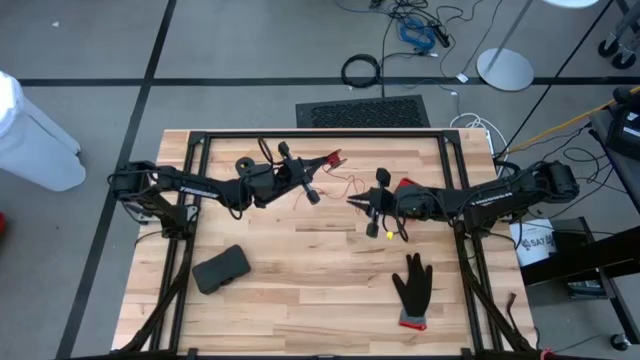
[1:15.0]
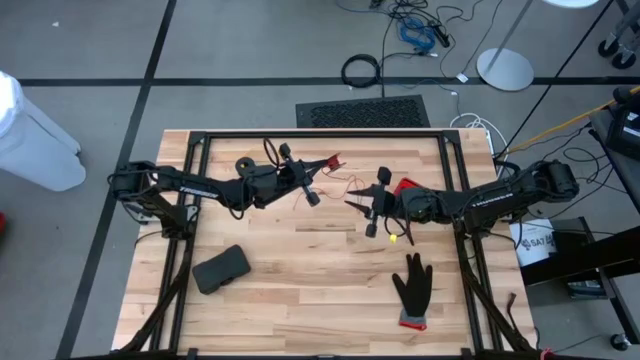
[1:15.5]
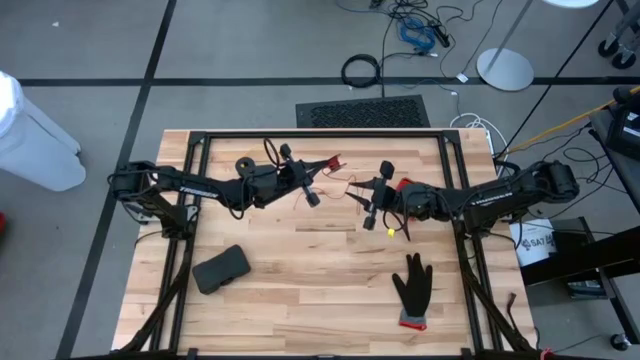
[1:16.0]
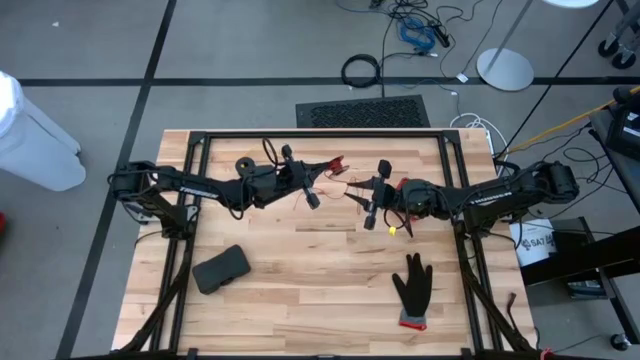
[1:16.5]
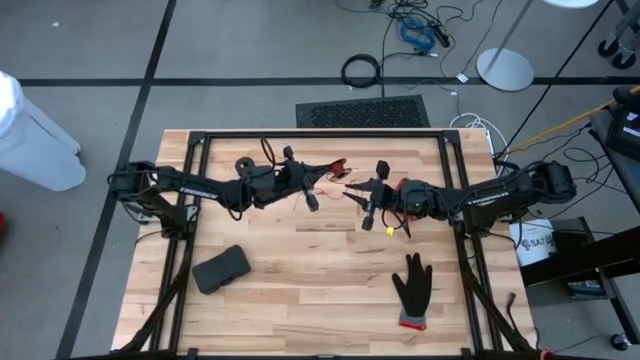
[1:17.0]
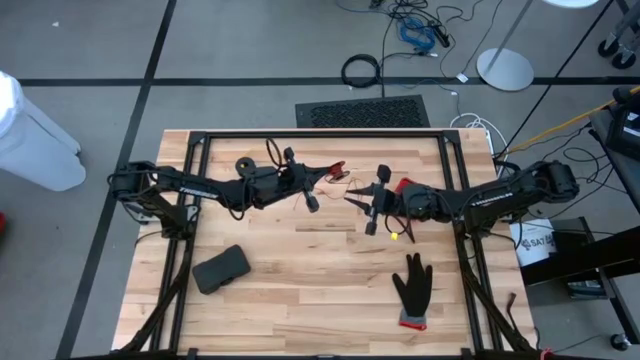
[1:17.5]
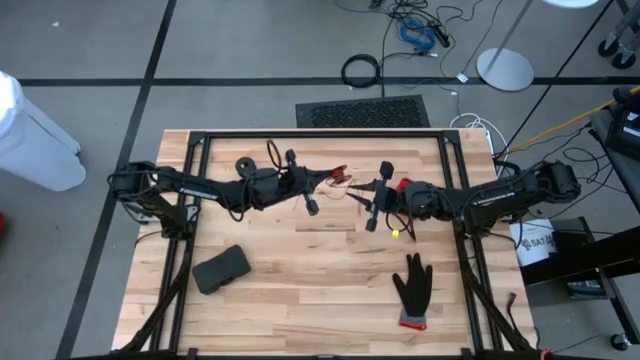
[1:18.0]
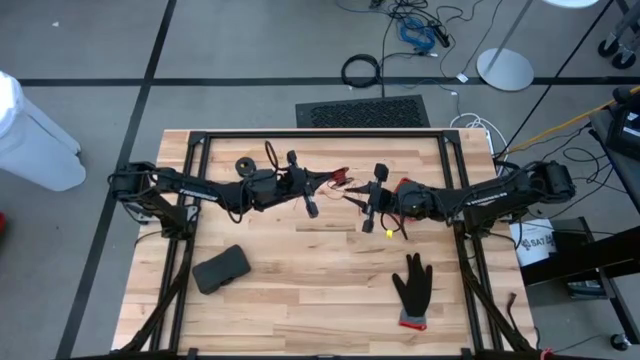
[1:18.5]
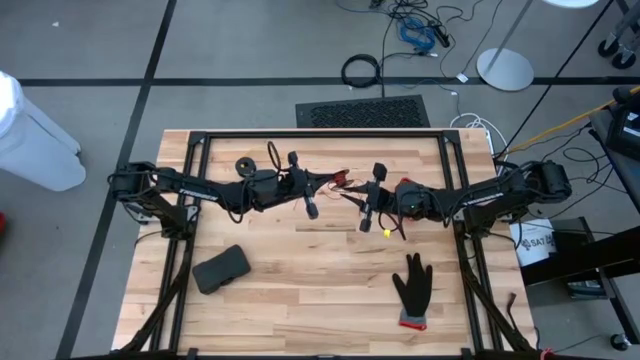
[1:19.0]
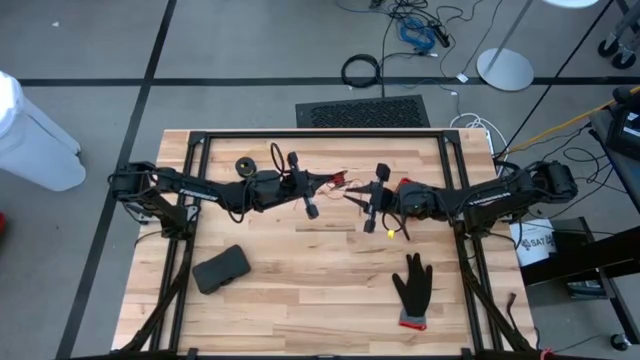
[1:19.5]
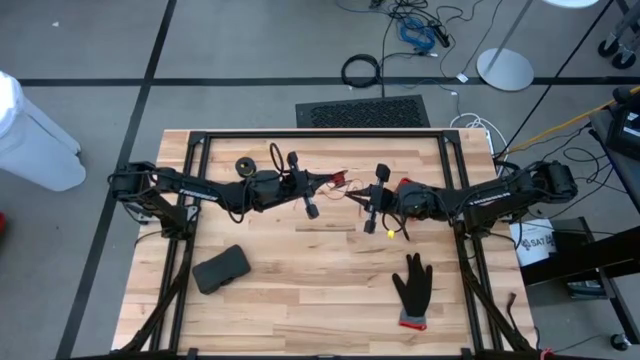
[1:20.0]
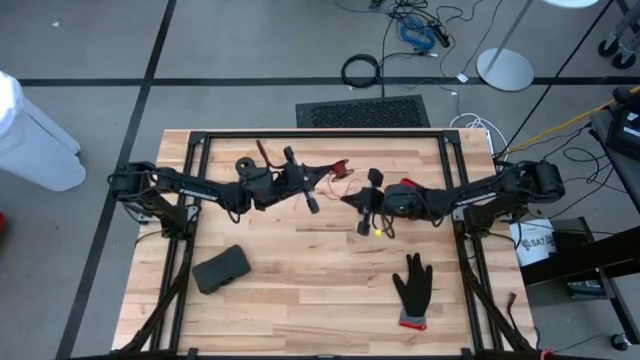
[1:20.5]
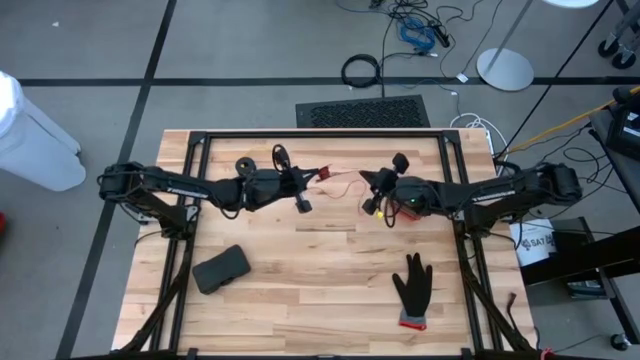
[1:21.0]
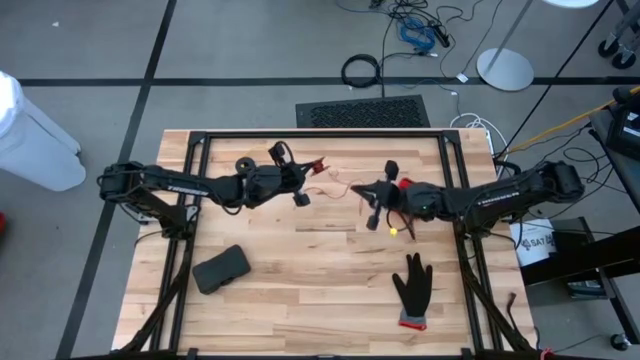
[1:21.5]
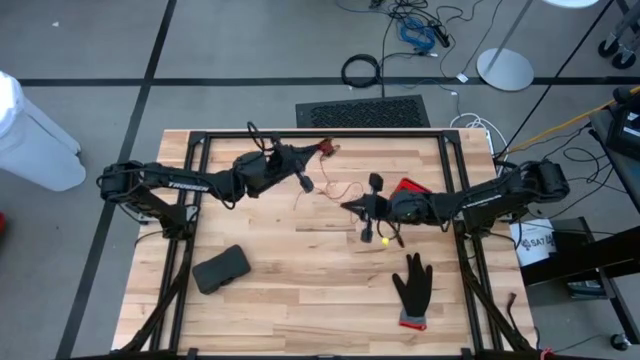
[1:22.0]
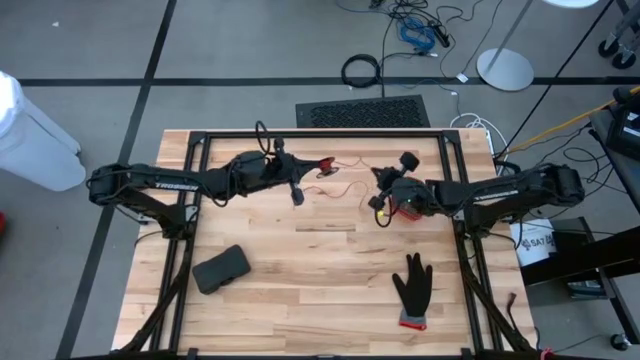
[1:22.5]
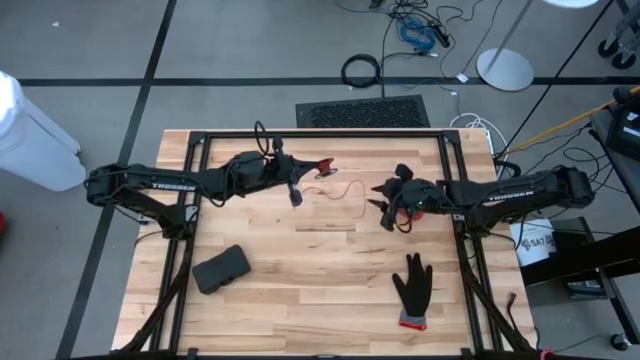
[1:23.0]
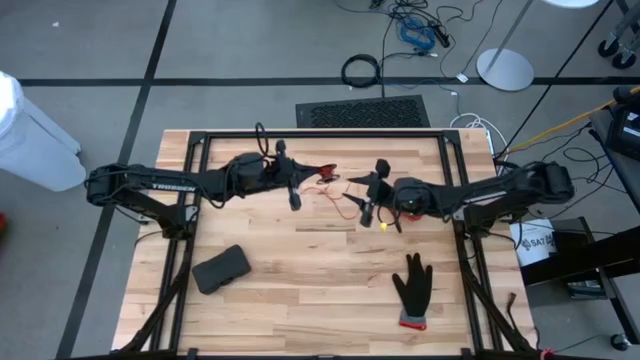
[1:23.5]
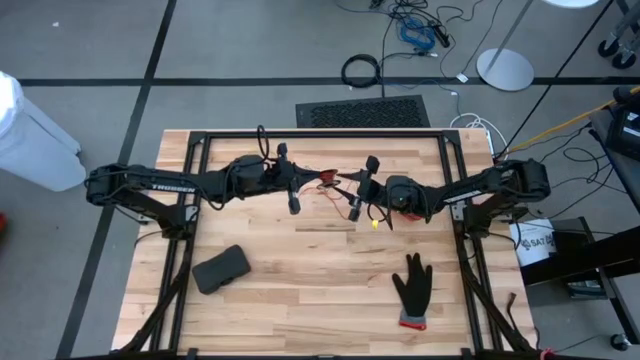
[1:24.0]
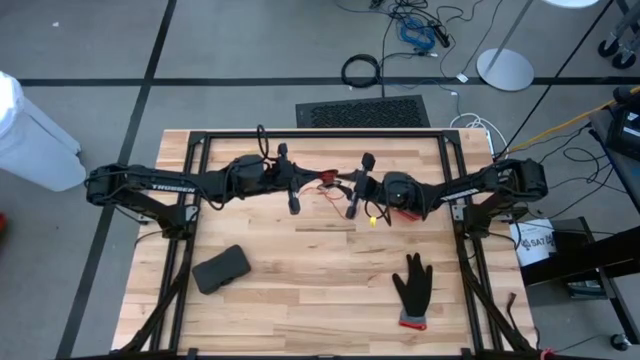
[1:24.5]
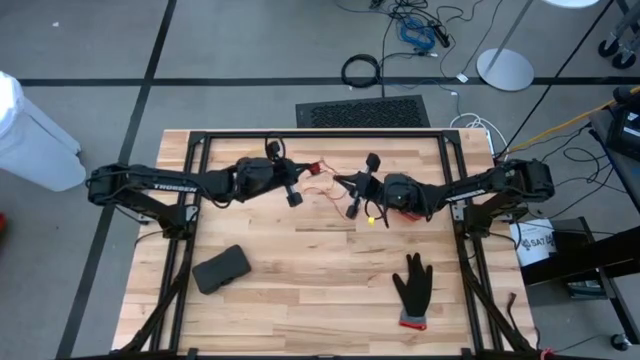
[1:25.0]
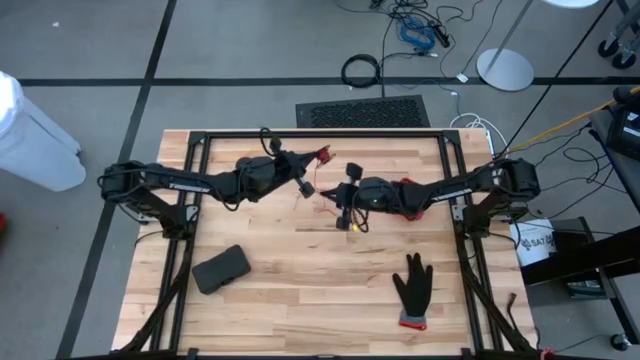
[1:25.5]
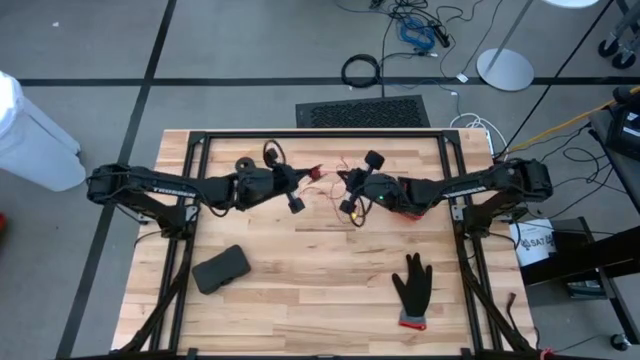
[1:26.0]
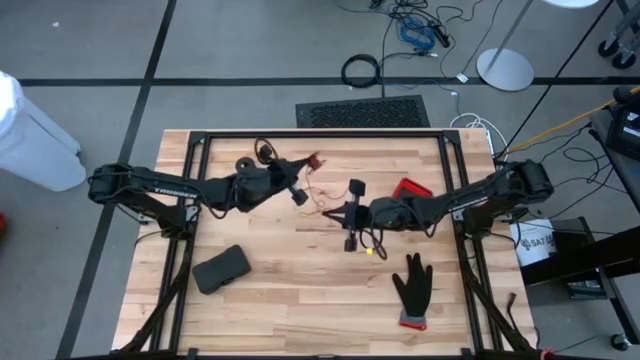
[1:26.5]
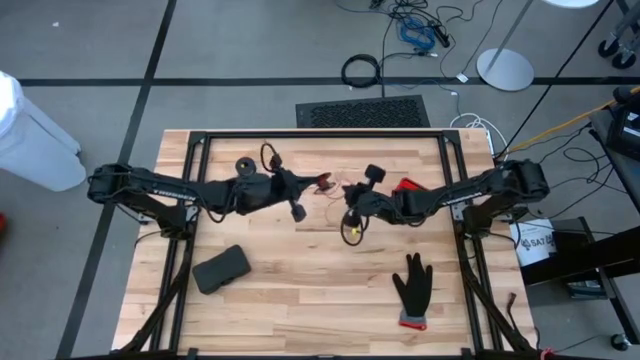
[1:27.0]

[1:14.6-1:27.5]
Task: Coil cords
Uncoil the red wire from the black spool

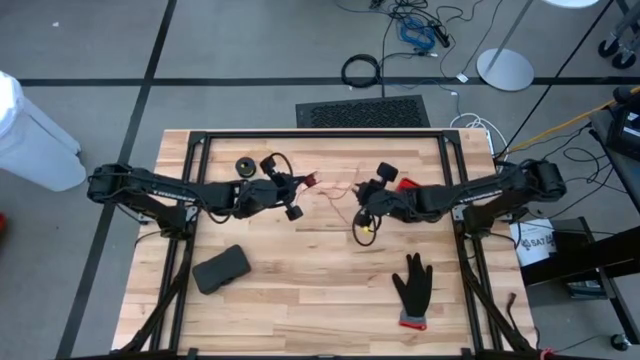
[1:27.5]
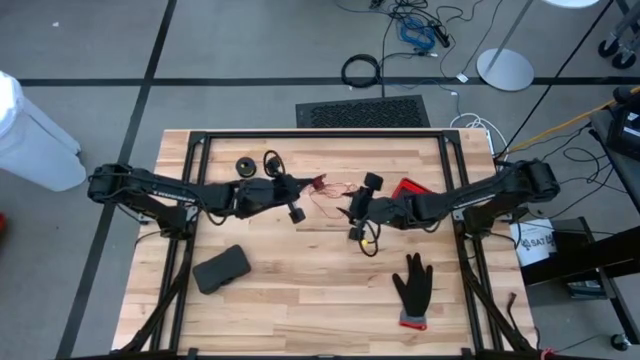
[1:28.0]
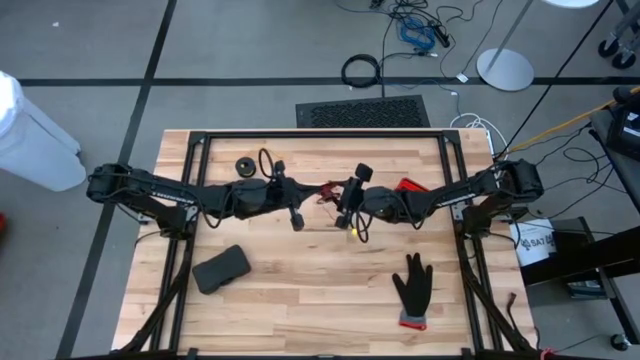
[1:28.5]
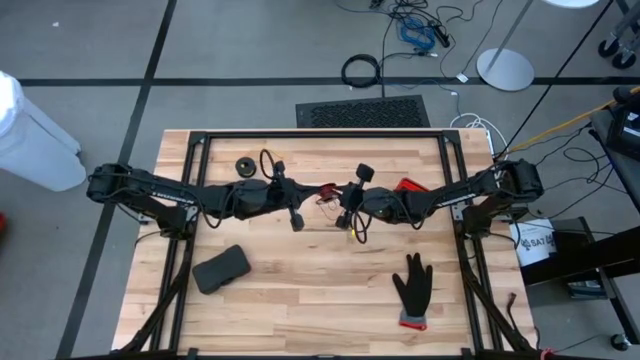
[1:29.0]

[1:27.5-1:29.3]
Uncoil the red wire from the black spool

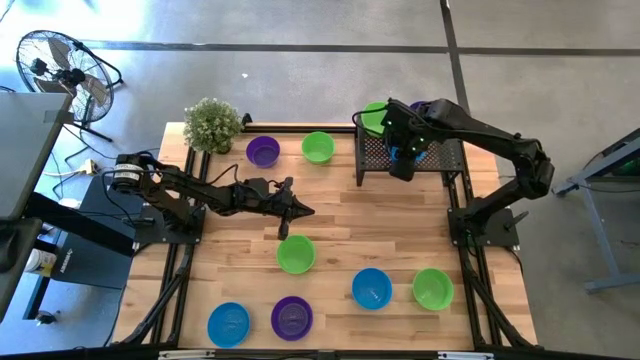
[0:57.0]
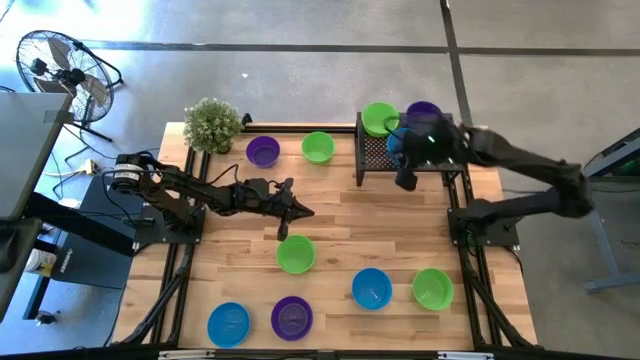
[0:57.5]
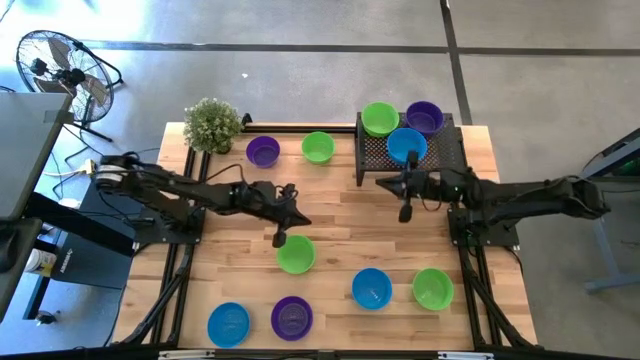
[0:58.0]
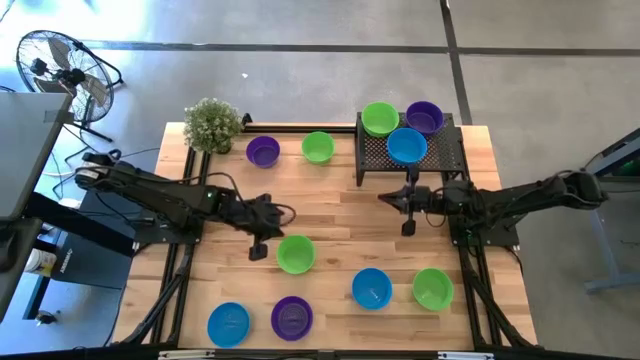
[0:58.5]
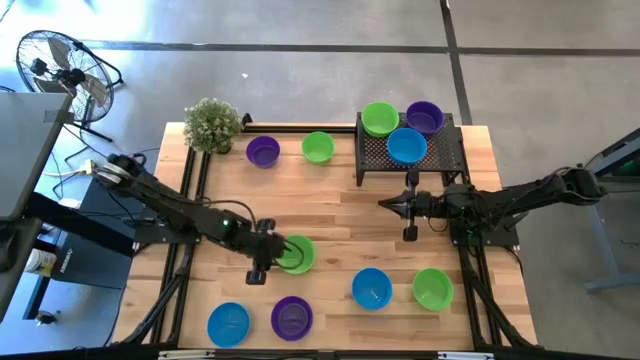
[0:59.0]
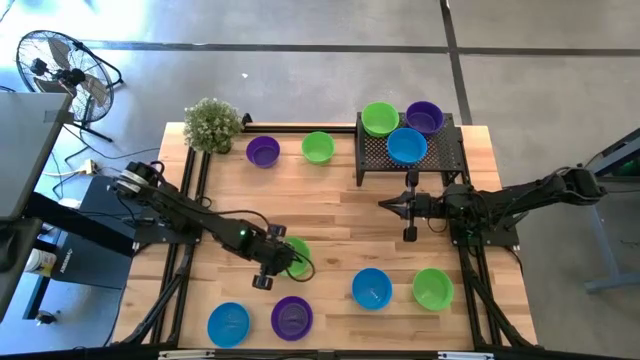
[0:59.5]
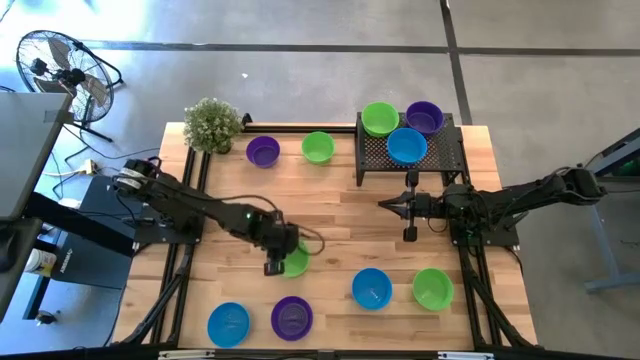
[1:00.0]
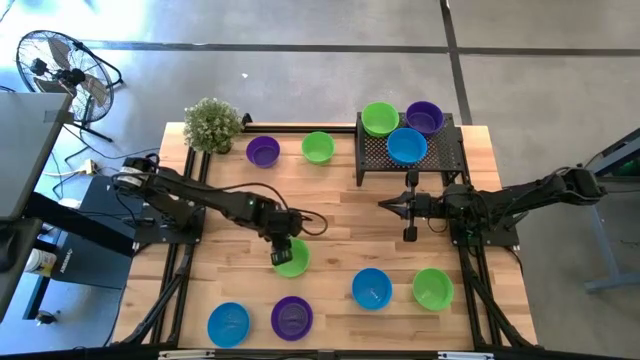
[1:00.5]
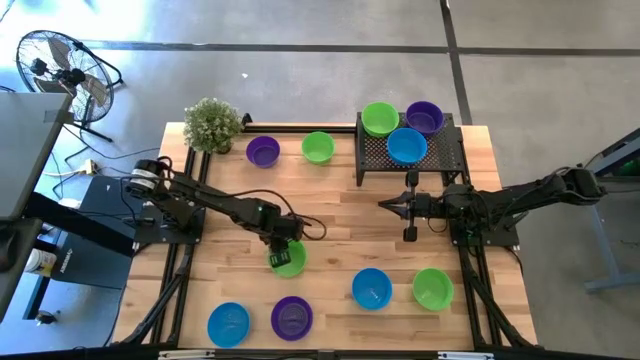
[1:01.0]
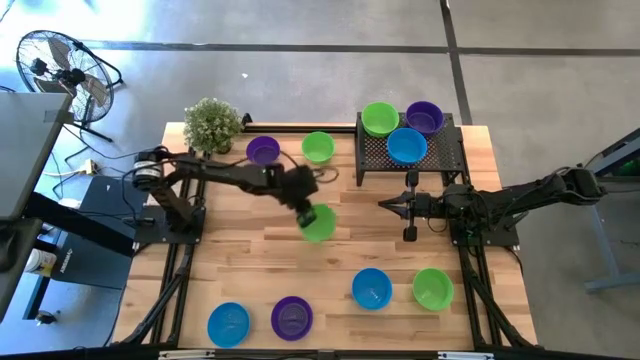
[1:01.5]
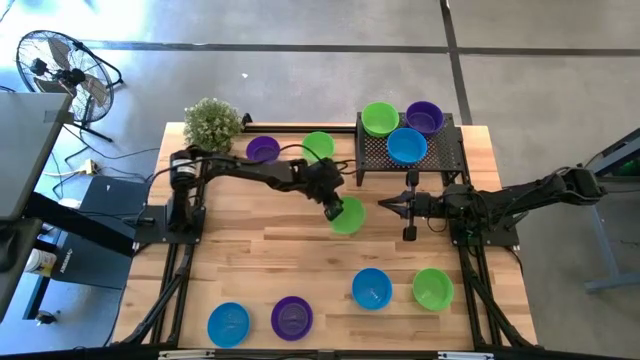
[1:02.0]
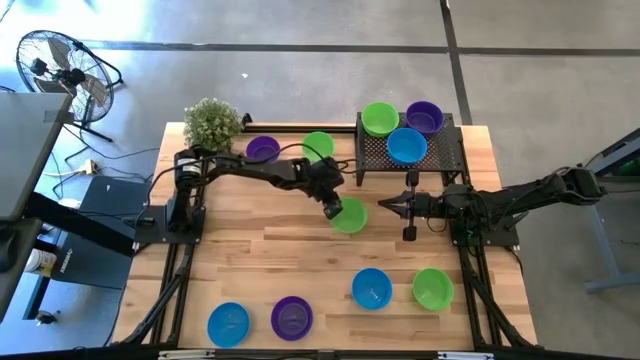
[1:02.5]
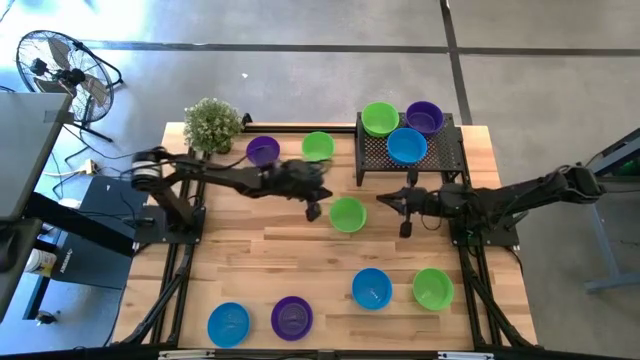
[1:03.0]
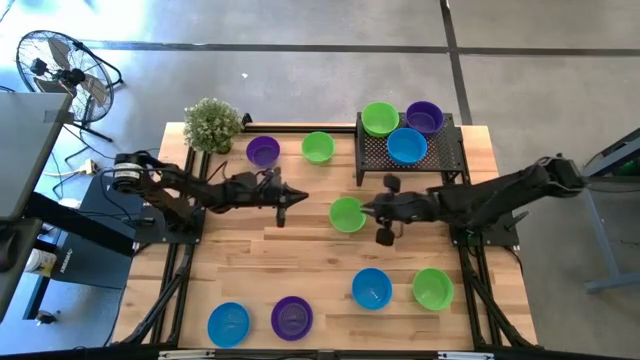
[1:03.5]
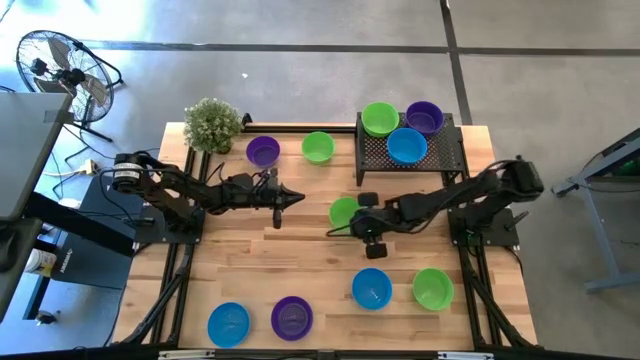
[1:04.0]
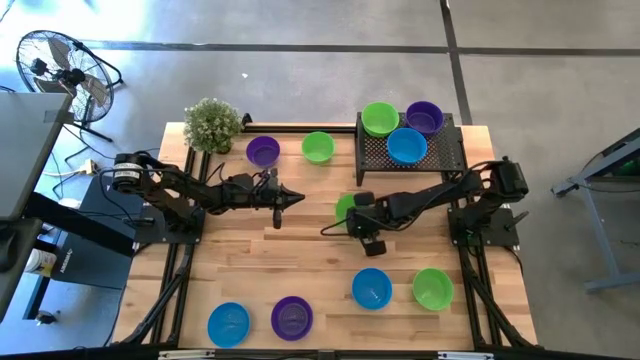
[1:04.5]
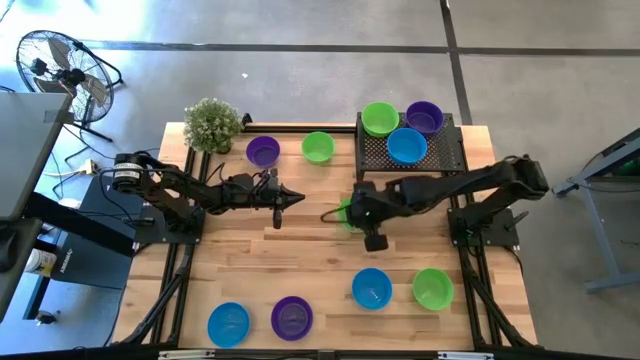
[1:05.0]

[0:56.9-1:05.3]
Task: Pick & Place Mini bowls
Stack the green bowl on the other green bowl on the shelf
